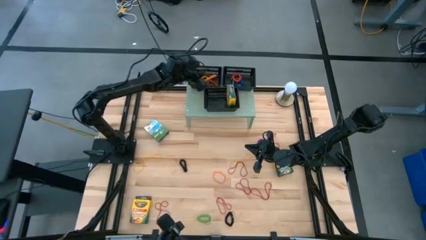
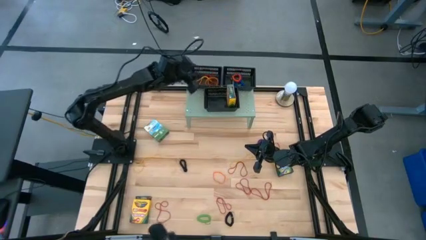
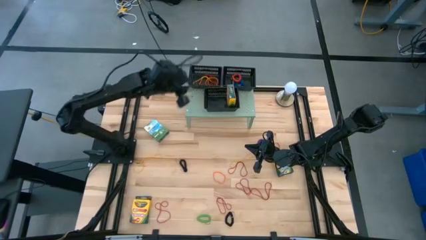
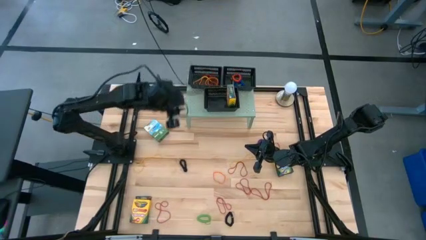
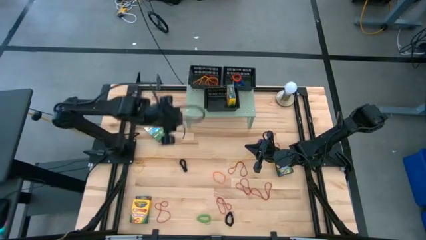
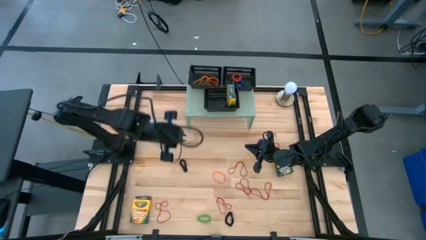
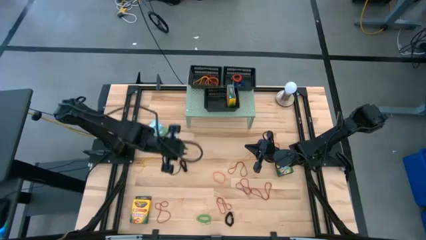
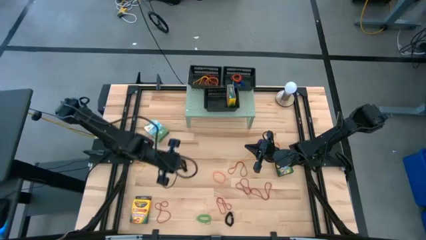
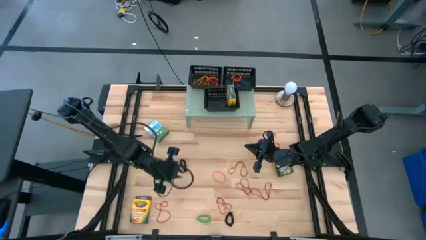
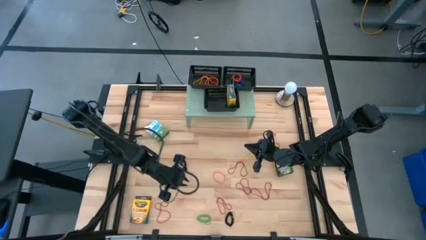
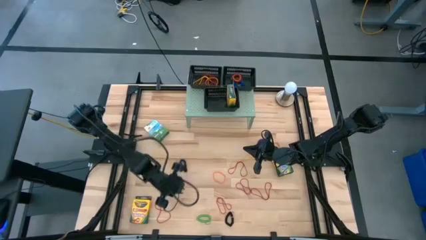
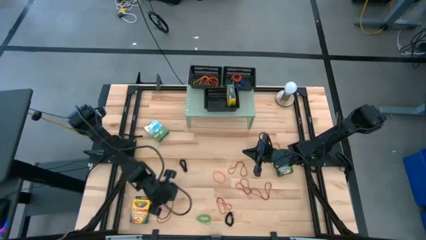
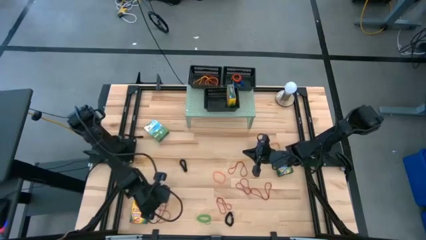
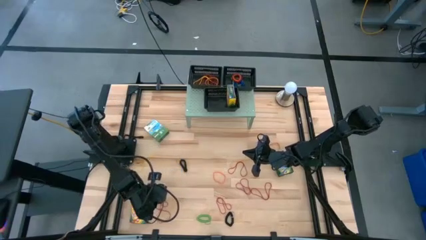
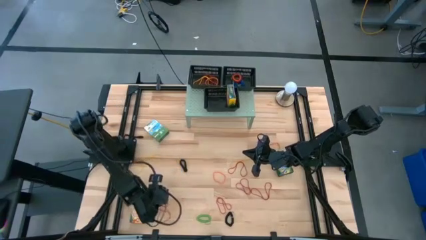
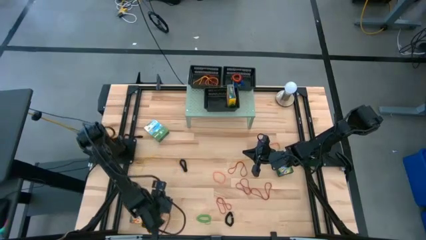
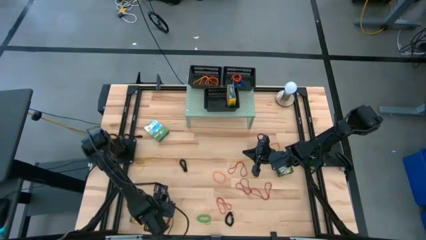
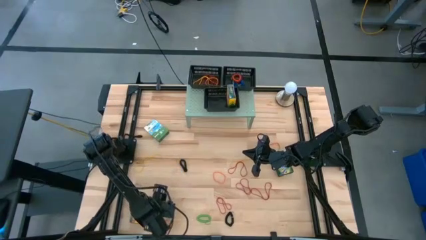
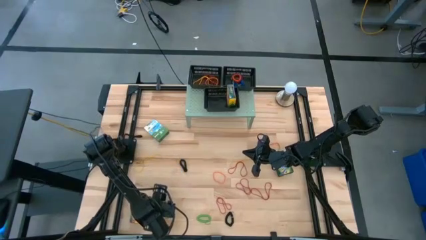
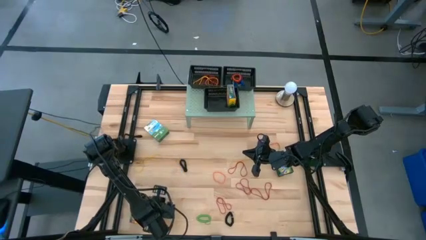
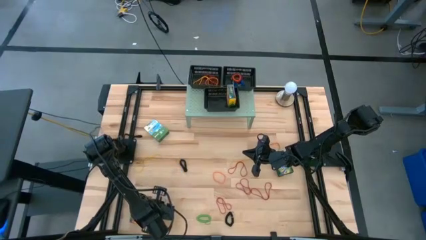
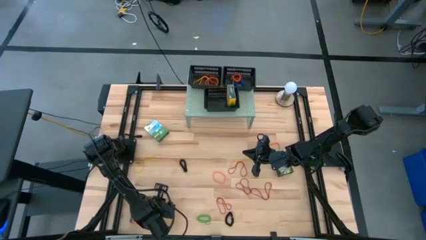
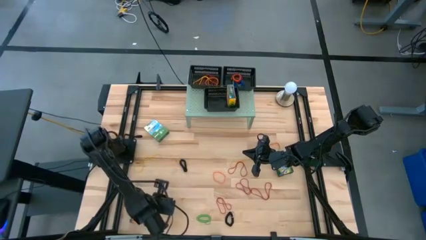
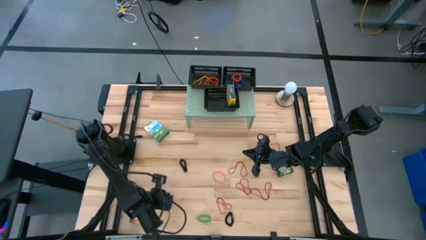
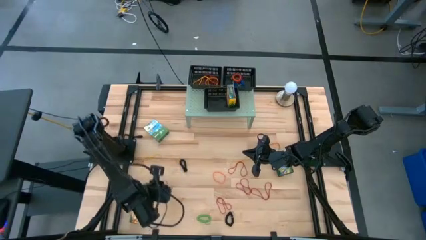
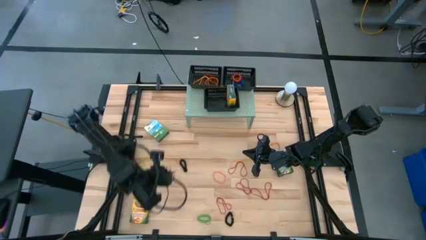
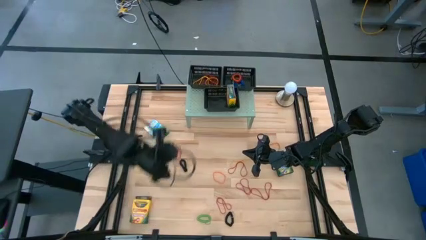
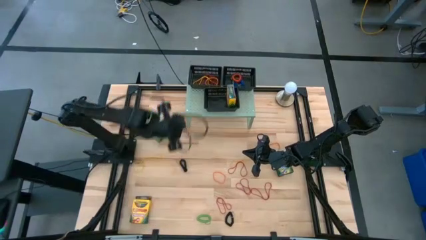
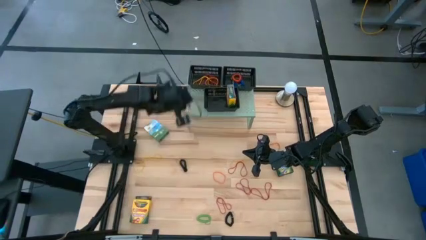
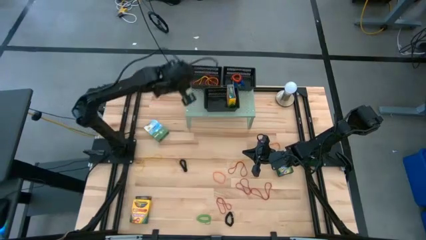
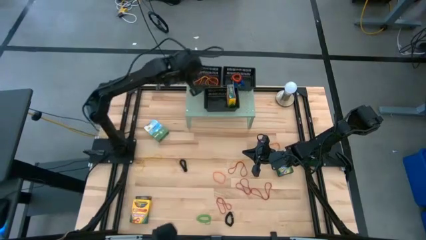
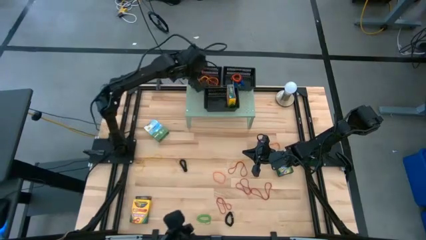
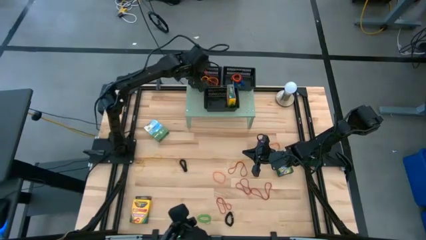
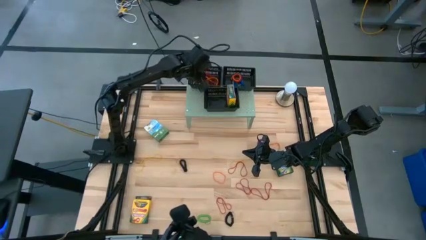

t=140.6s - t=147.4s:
Task: Pick & Place Office Desk Supplies
Put the red rubberband into the top left black bin

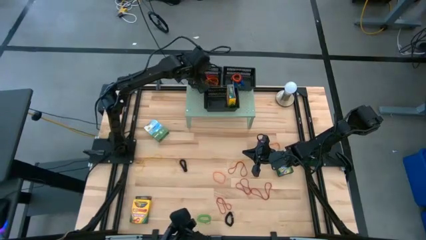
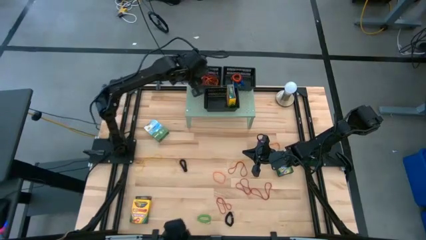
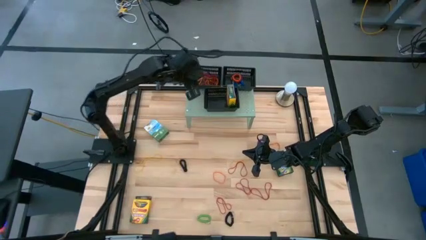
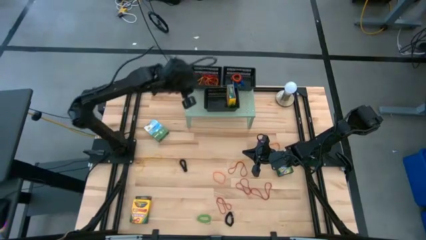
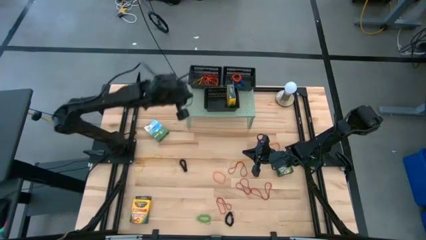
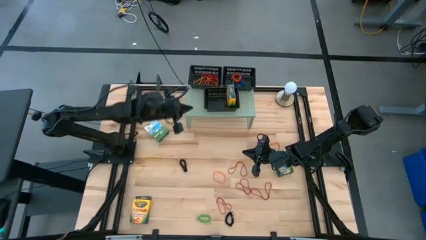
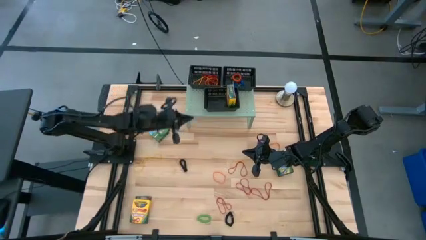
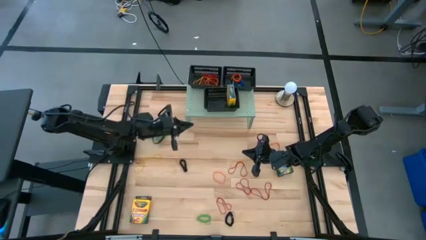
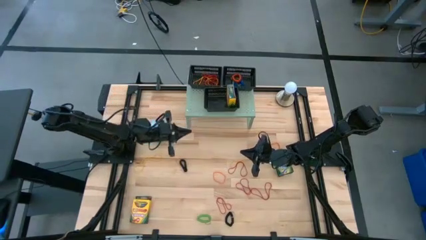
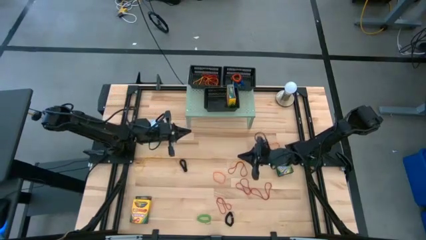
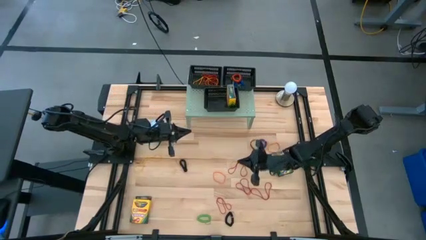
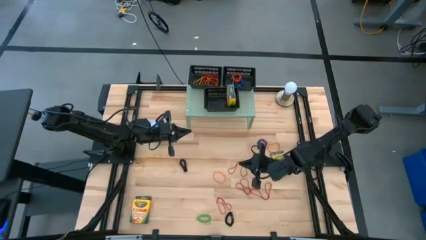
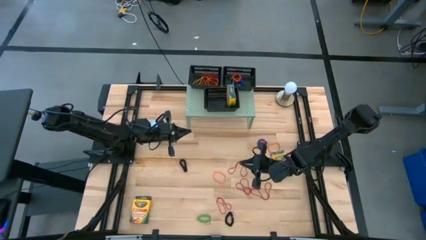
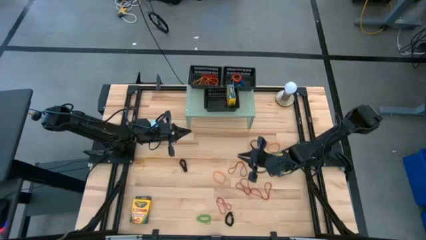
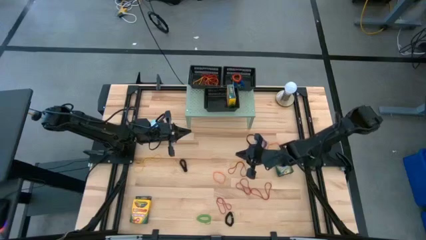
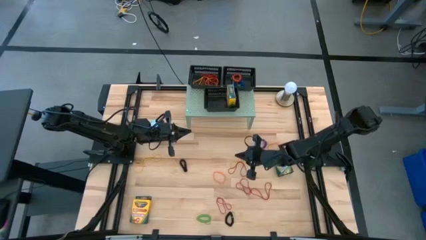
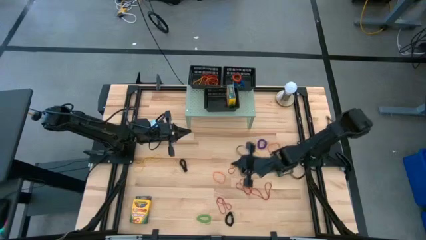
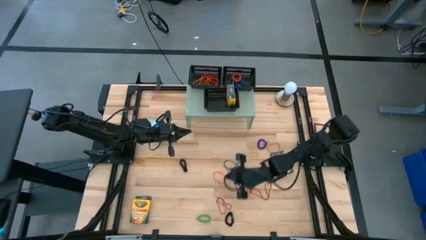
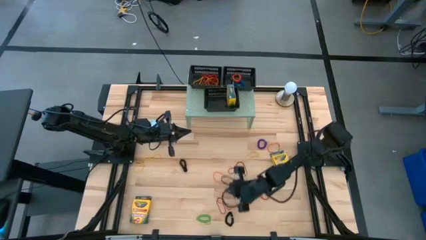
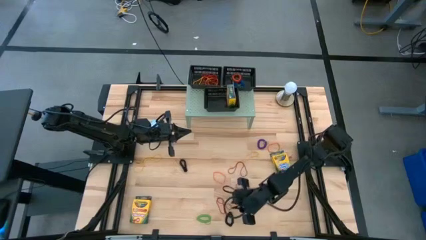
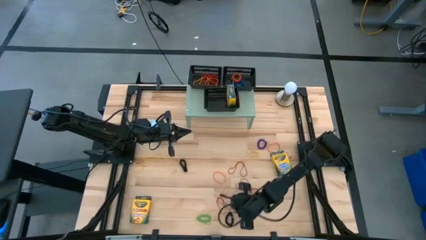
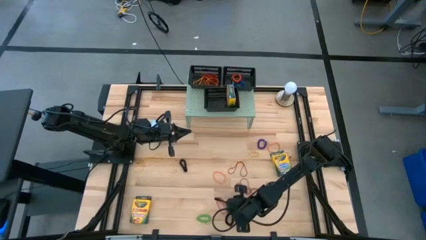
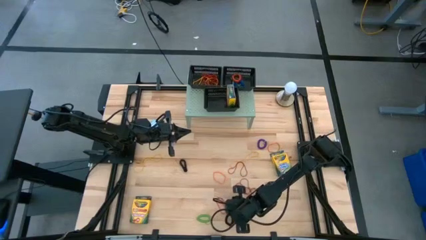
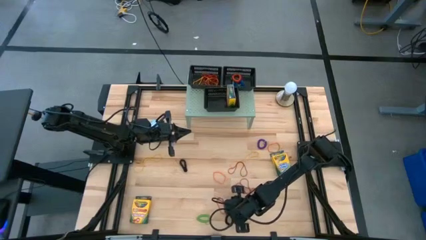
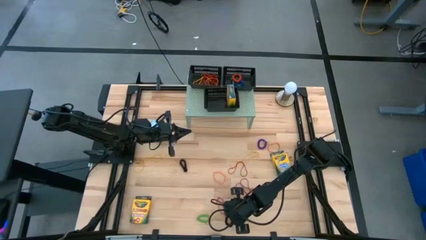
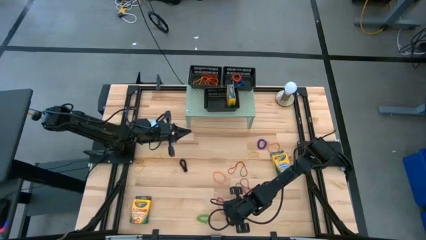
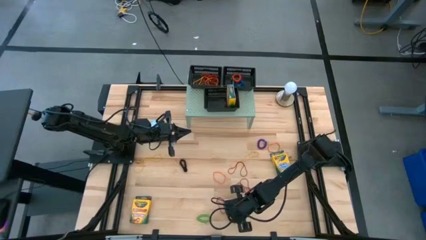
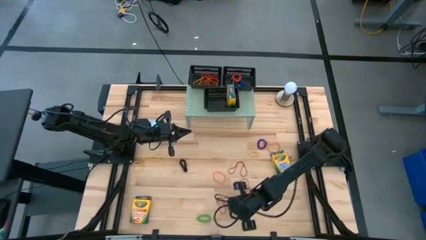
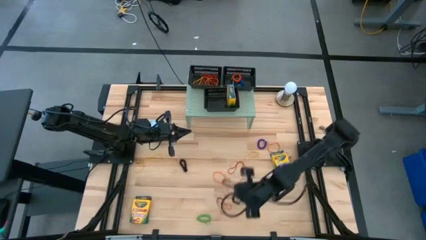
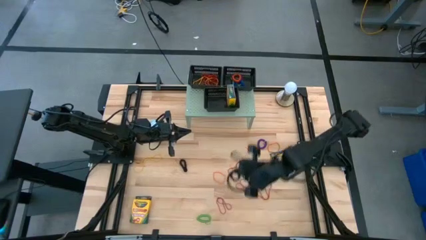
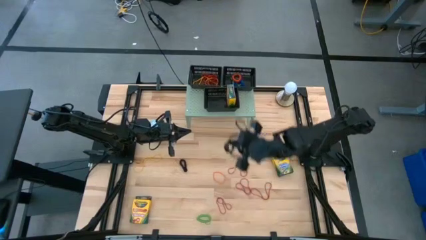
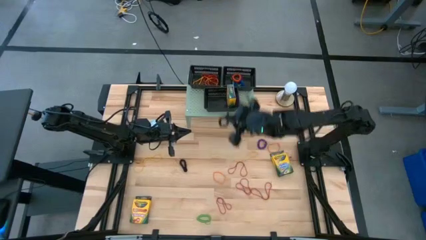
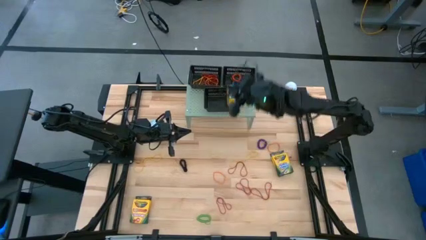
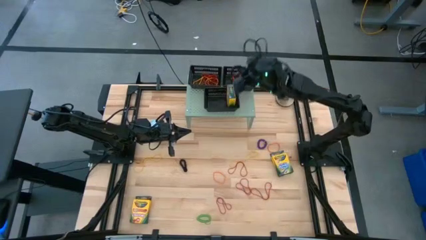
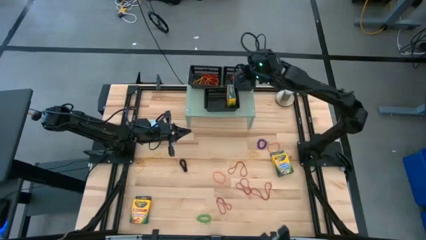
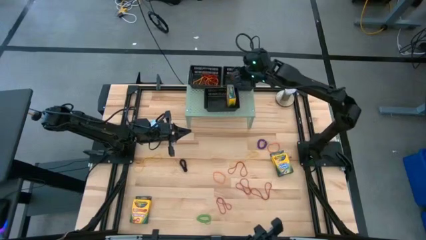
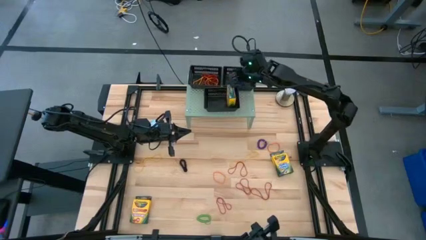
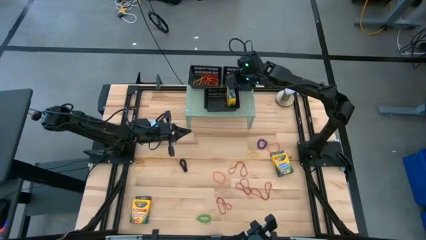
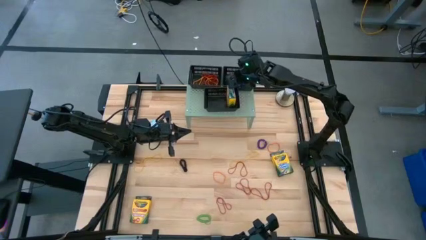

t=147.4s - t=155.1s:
Put the black spiral keychain the top right black bin
